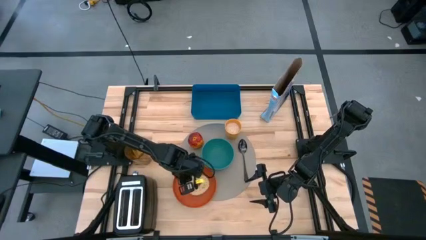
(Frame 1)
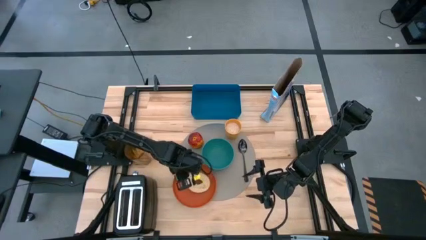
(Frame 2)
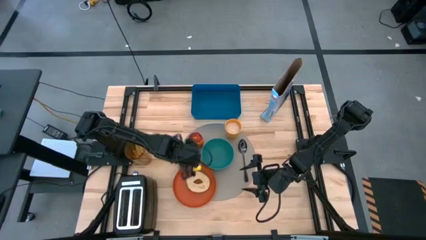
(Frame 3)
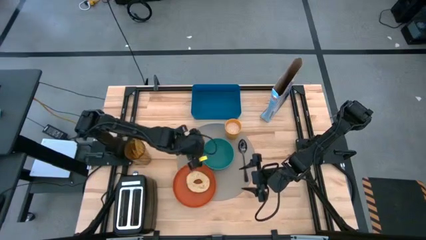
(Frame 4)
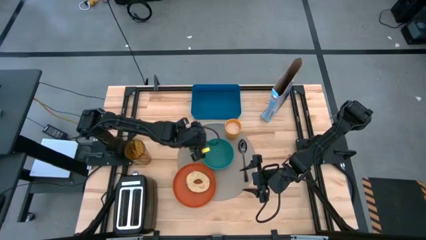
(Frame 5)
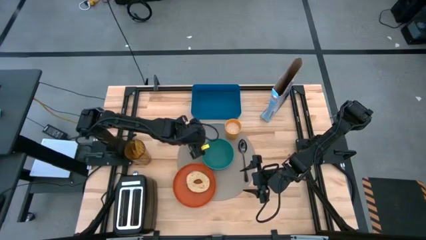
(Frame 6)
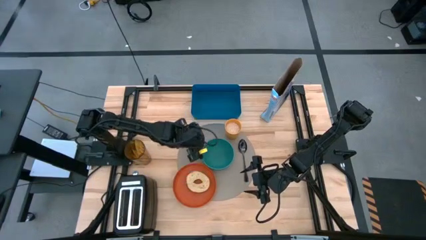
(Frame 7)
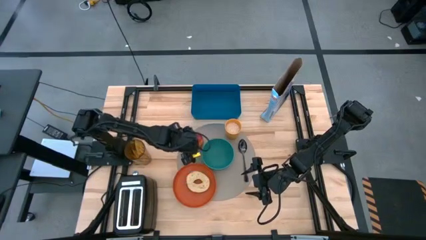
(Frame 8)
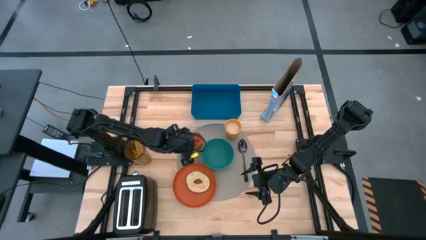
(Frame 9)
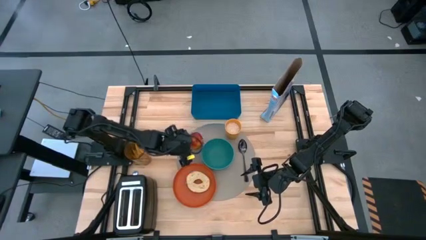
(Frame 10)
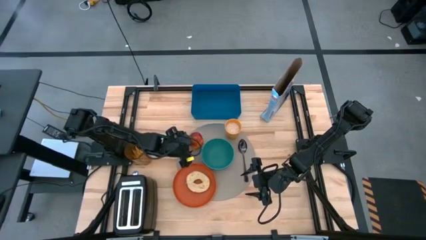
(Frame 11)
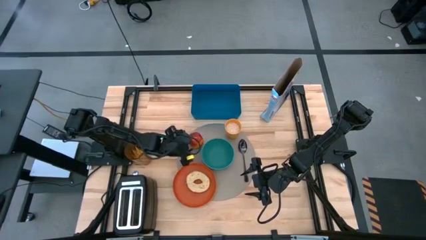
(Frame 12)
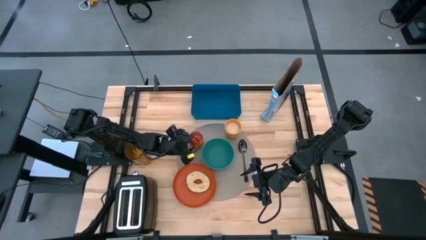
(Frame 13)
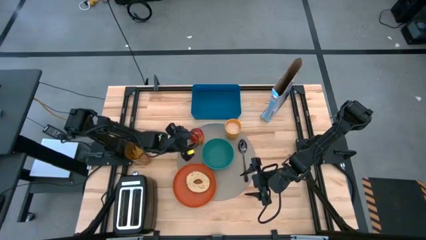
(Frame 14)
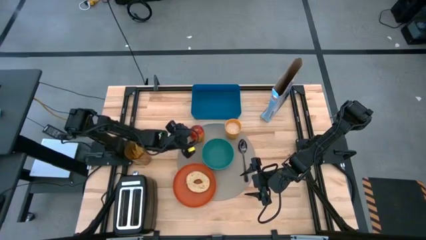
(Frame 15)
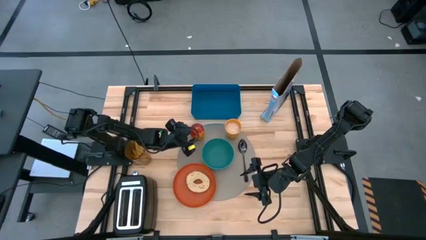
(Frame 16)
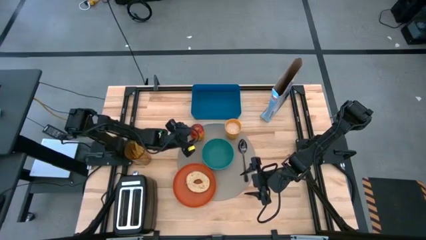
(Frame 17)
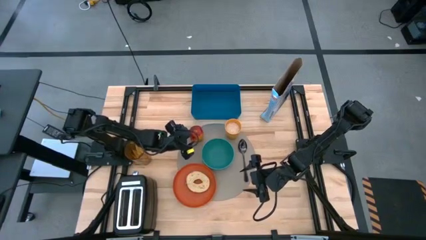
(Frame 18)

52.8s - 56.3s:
Task: Arrange a breakfast setting
Adjust the red apple on the gray table mat

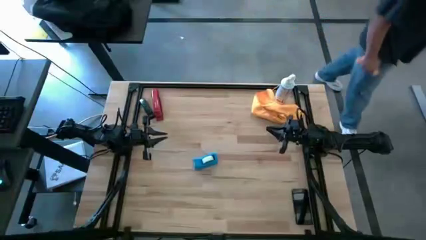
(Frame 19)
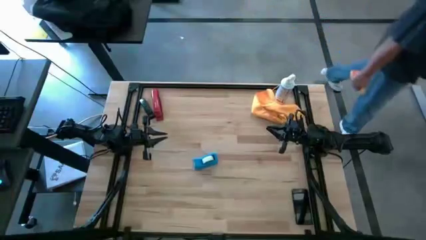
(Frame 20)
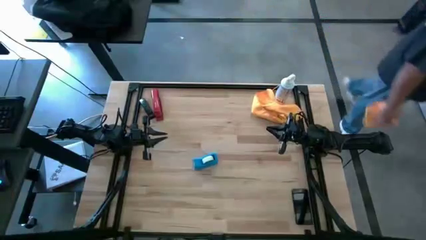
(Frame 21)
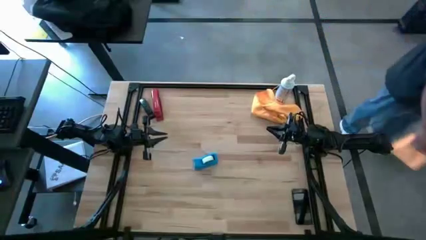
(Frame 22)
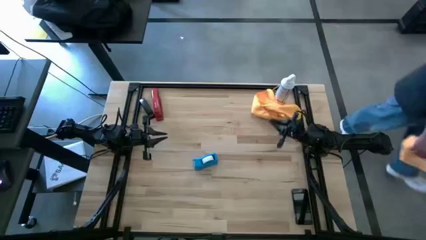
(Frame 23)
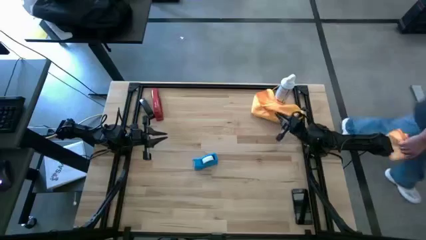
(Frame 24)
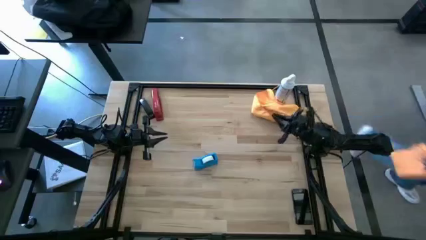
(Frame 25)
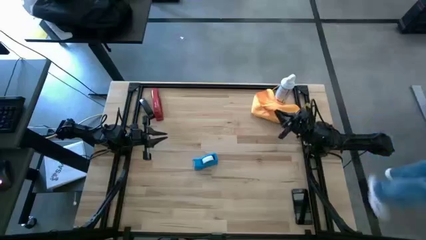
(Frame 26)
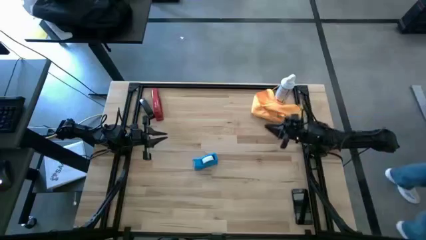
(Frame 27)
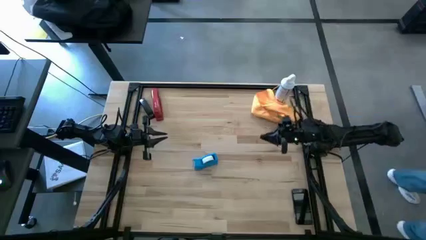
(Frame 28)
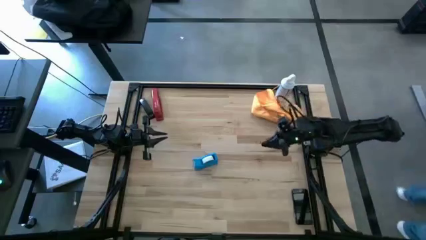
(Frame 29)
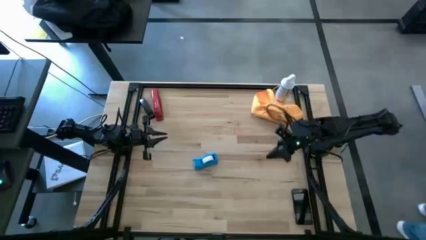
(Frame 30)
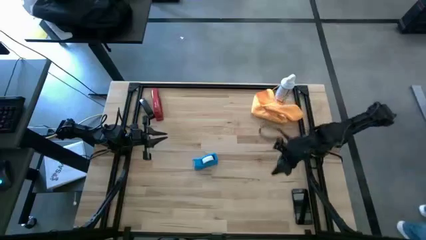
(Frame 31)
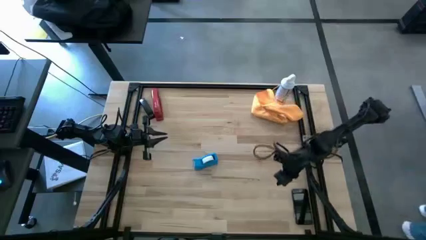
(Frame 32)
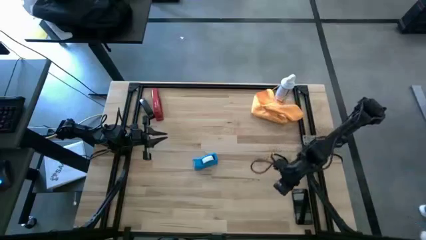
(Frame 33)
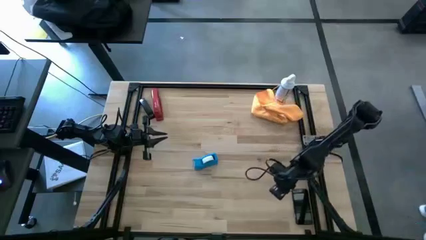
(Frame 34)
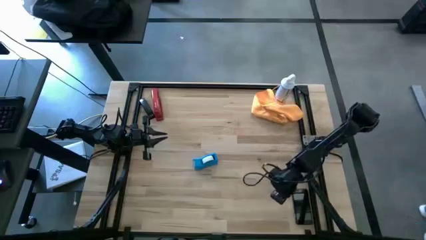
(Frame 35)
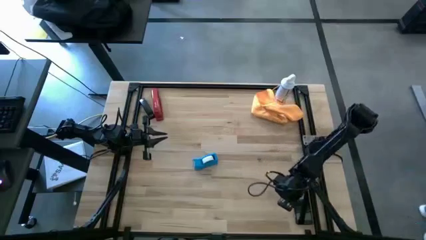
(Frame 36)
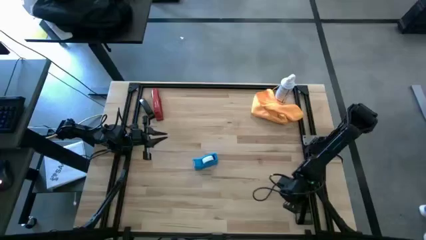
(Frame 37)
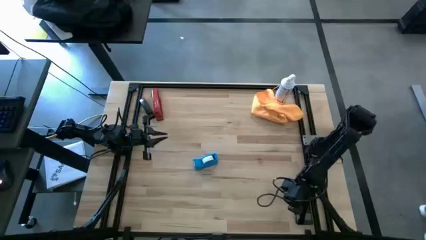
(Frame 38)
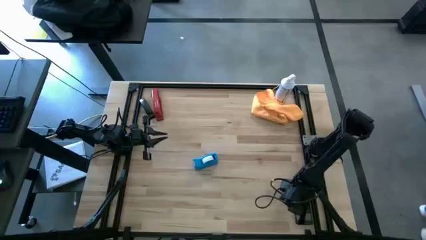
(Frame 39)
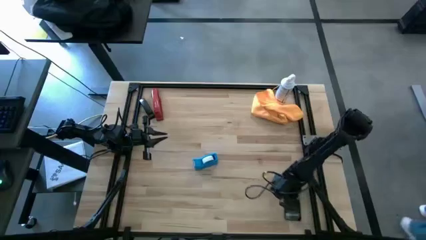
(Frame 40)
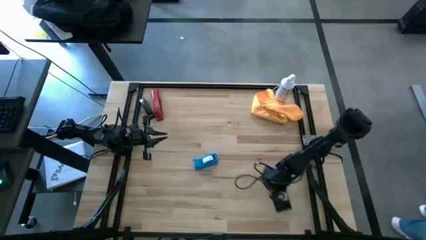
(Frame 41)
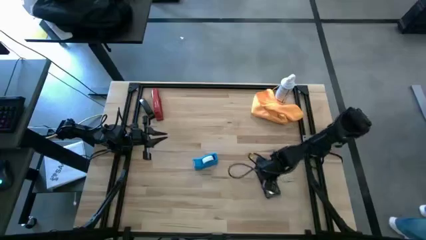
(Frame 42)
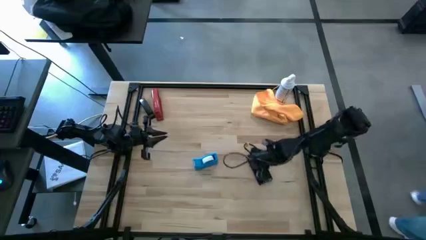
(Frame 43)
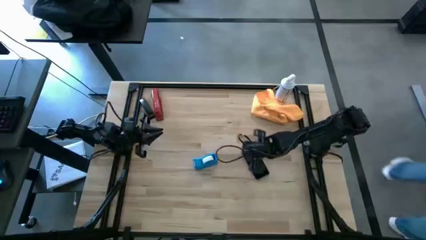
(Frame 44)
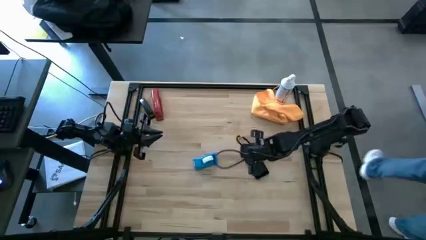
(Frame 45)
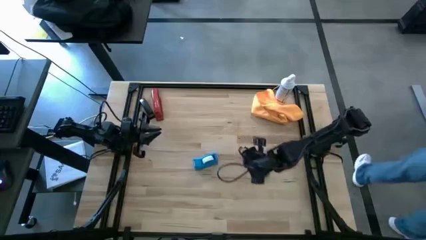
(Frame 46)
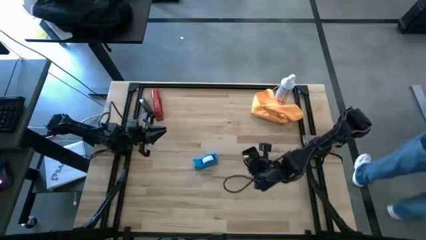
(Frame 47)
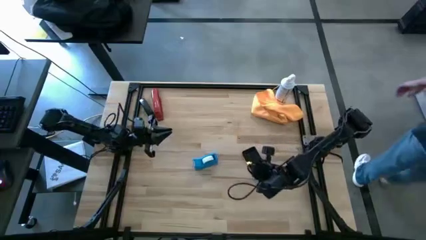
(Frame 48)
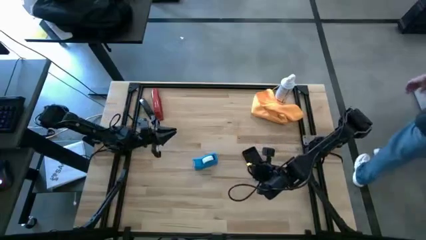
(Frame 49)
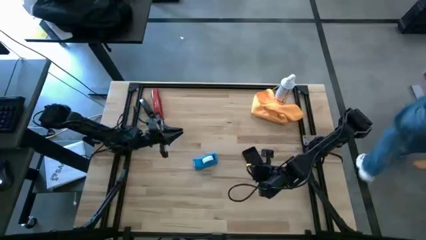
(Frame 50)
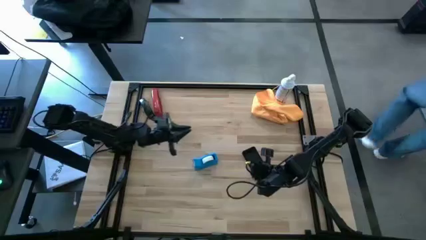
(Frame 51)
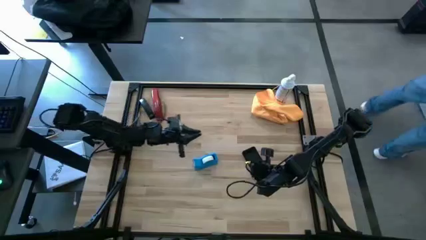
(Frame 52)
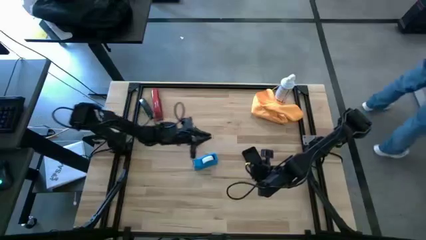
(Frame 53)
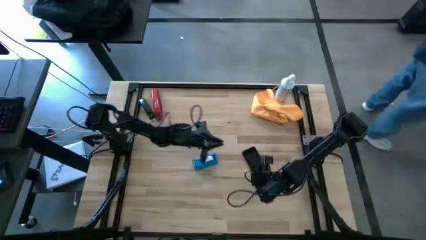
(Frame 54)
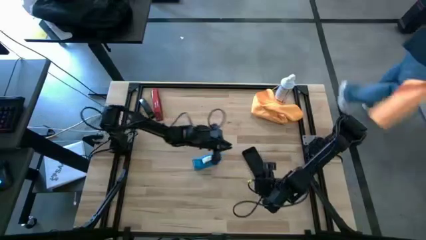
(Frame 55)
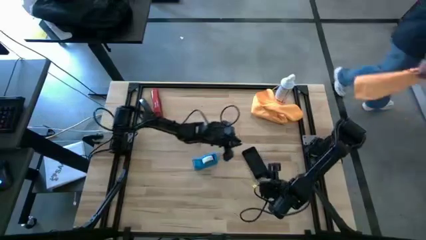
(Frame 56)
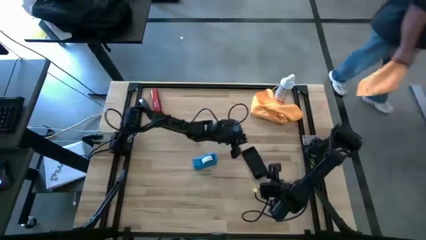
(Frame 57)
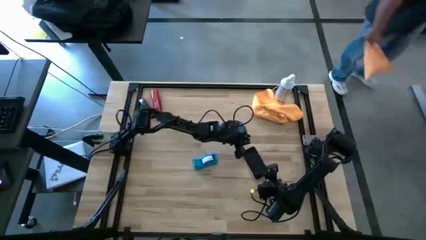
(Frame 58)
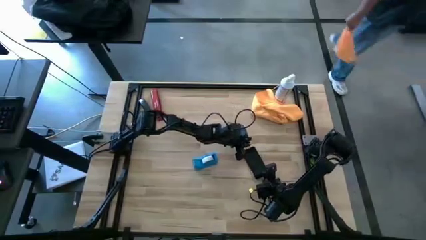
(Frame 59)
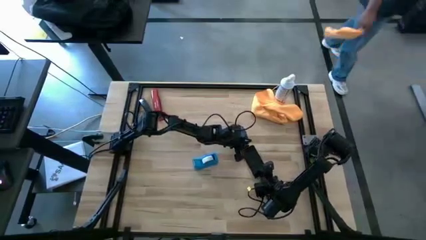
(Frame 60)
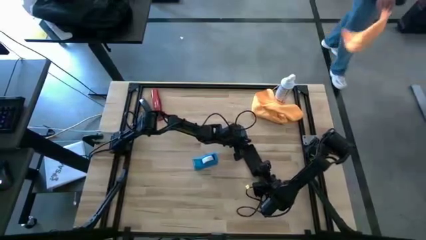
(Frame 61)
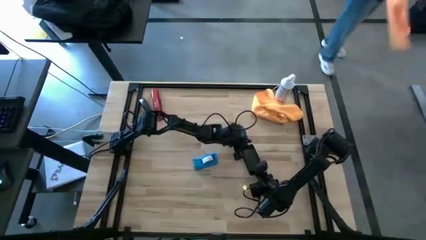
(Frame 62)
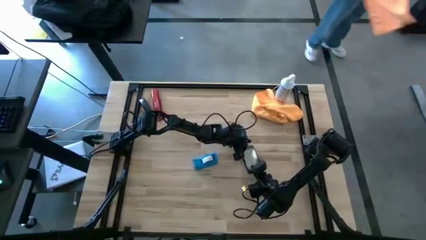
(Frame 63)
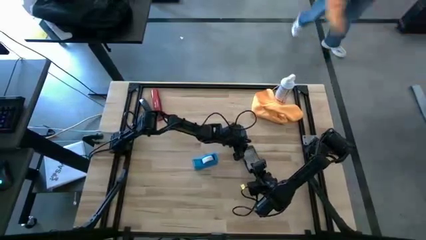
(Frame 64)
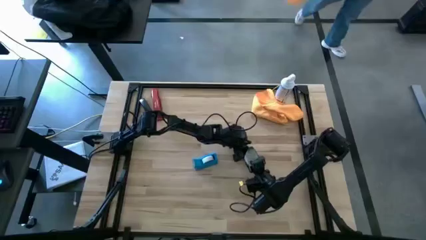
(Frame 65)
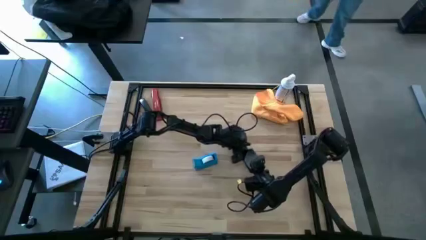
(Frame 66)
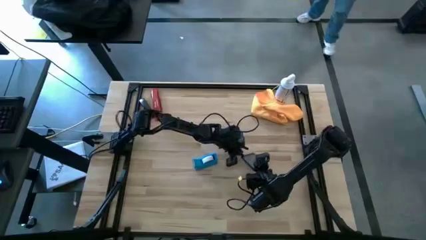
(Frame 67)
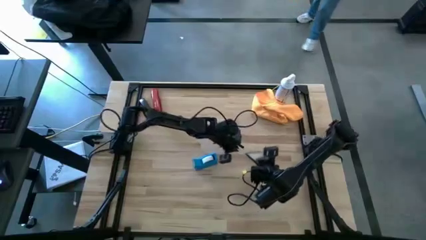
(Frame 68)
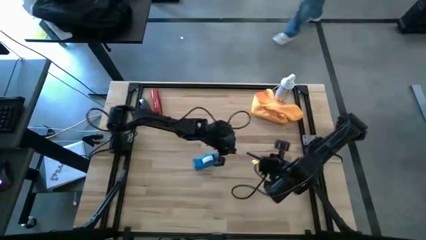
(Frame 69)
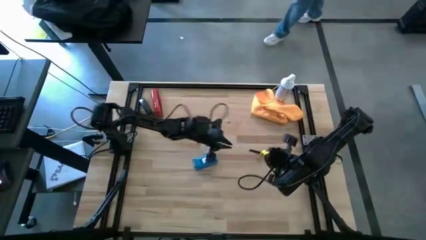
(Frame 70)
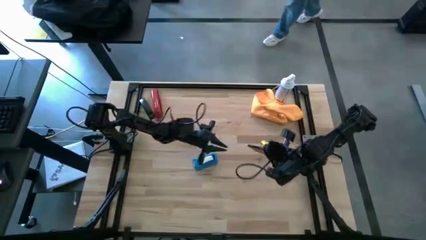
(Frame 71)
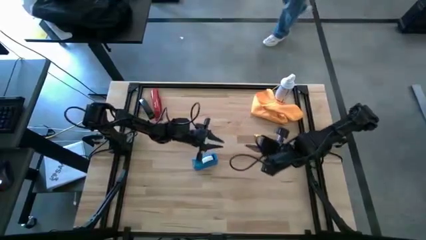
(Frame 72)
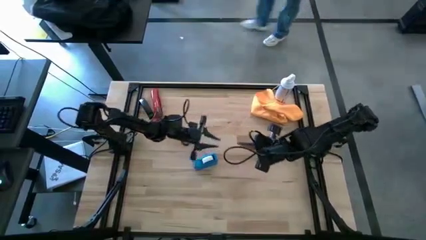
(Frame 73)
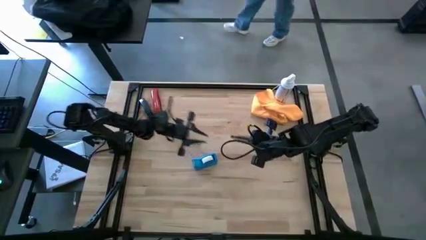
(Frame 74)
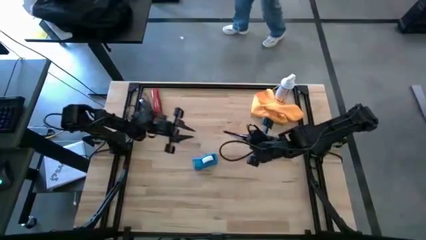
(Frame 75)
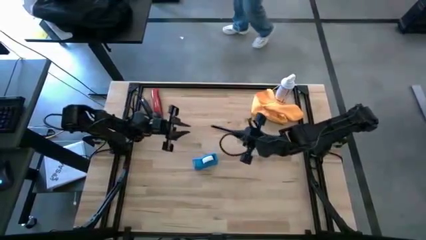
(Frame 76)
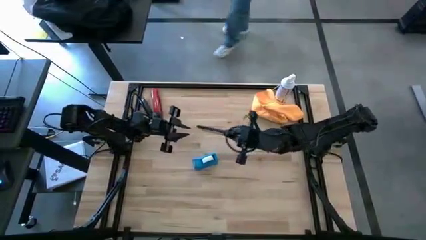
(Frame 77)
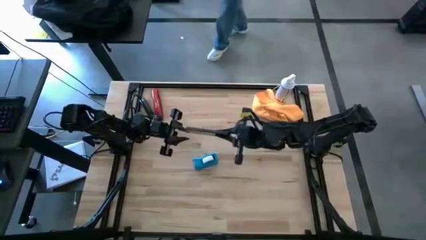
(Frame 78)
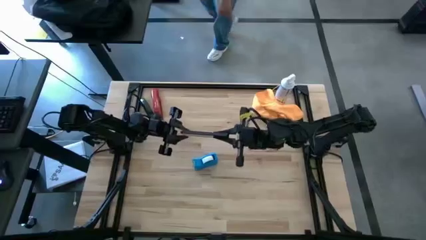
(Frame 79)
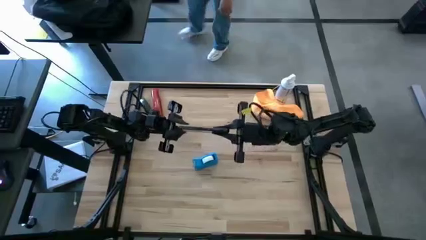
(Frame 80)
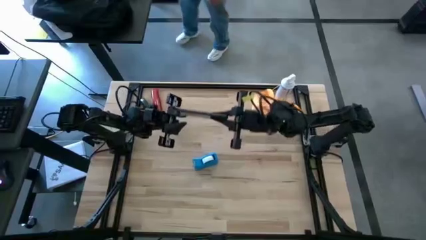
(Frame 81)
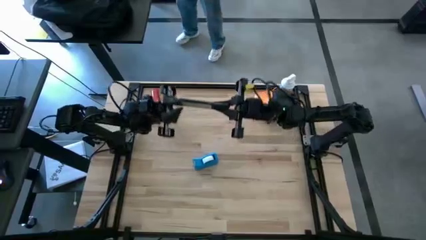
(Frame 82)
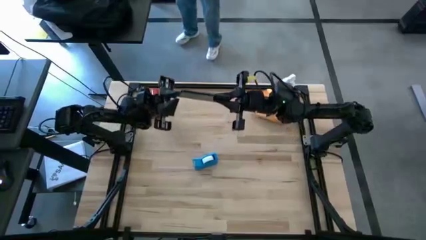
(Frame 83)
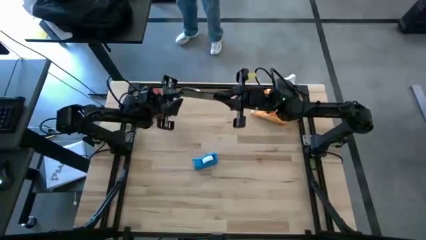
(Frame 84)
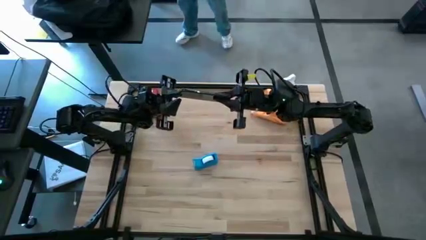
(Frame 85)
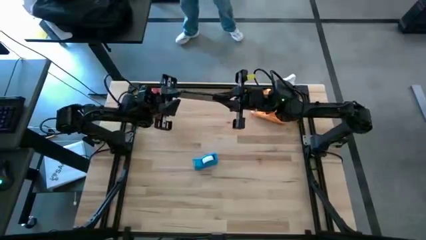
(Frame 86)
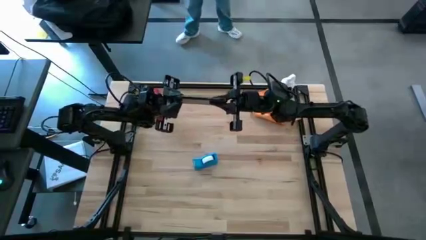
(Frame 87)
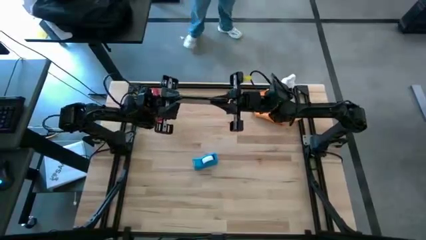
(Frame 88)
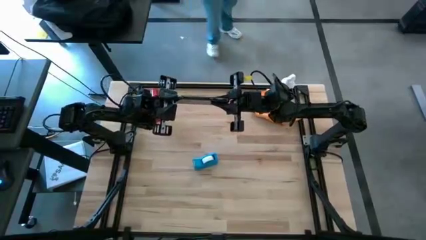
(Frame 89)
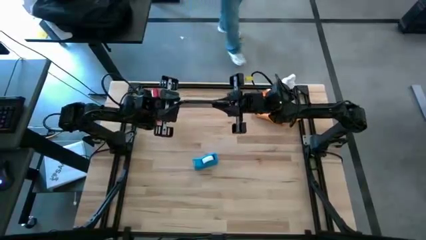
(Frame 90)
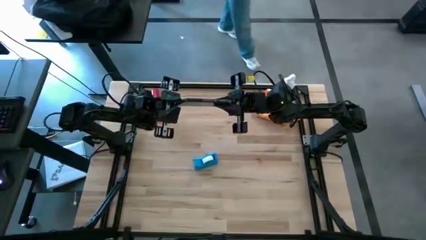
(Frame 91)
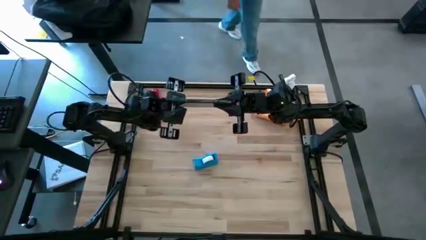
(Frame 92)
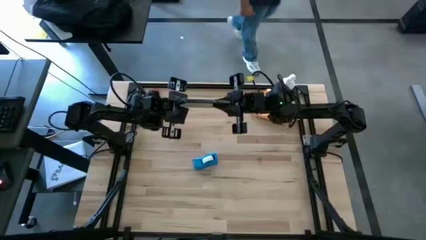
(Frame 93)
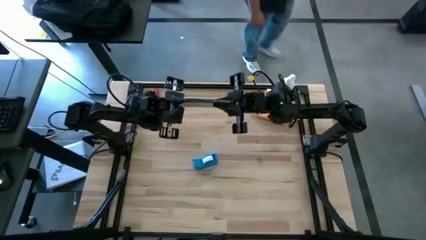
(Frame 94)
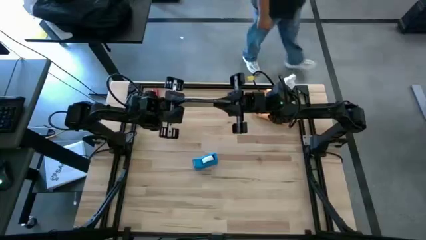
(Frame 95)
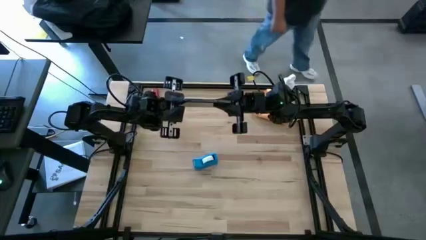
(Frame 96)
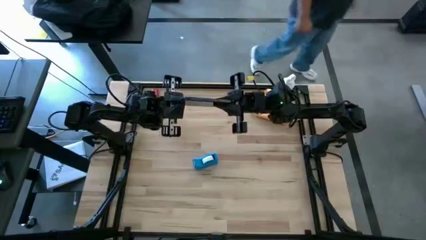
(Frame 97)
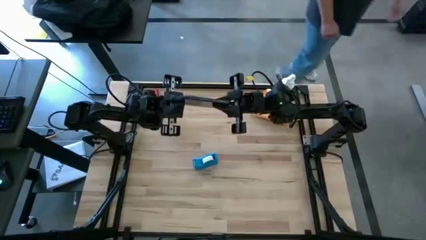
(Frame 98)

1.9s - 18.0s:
Task: Apply microfiber cloth
Spray the back of the black cellphone using the white spray bottle
